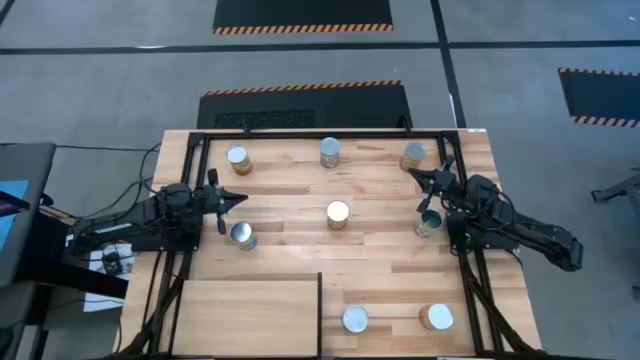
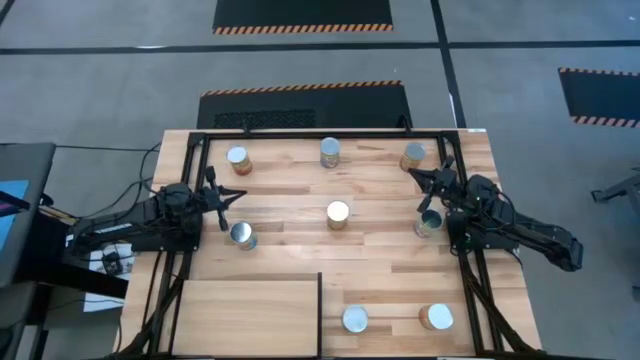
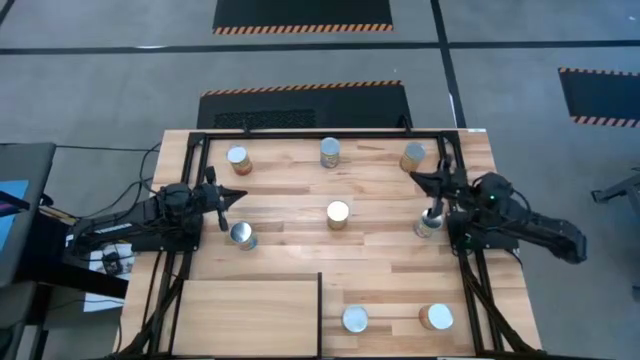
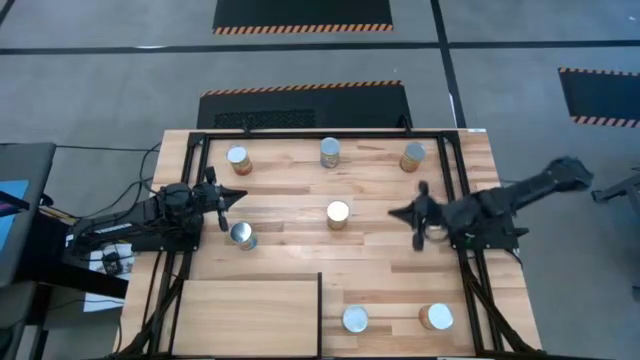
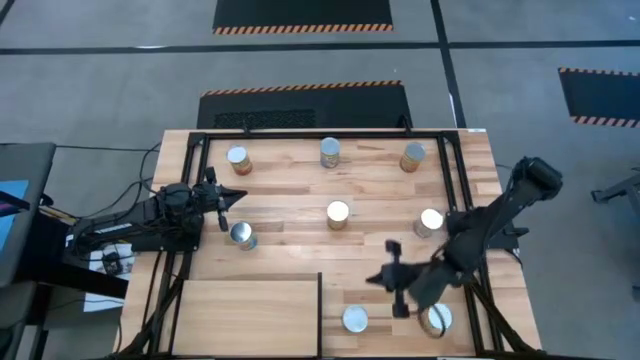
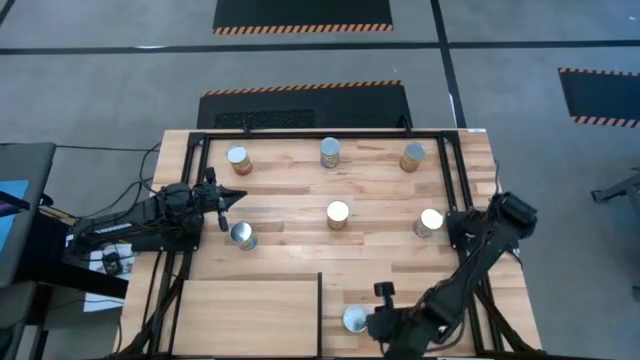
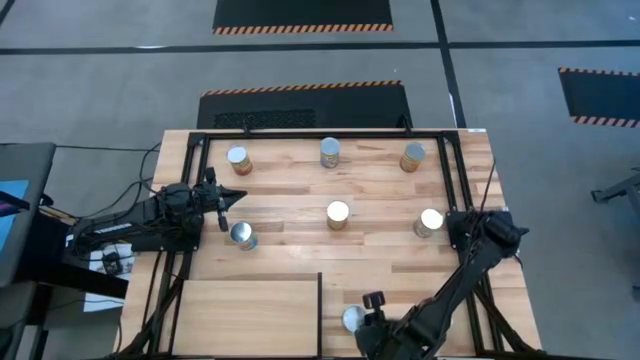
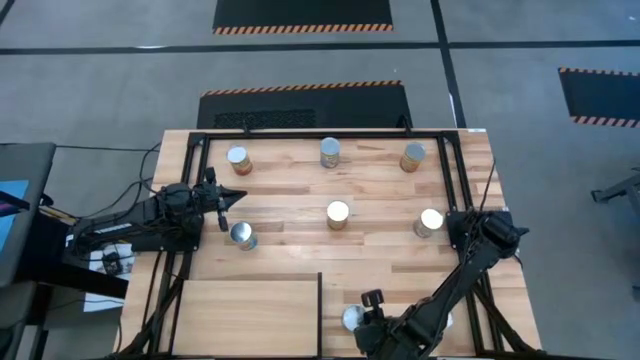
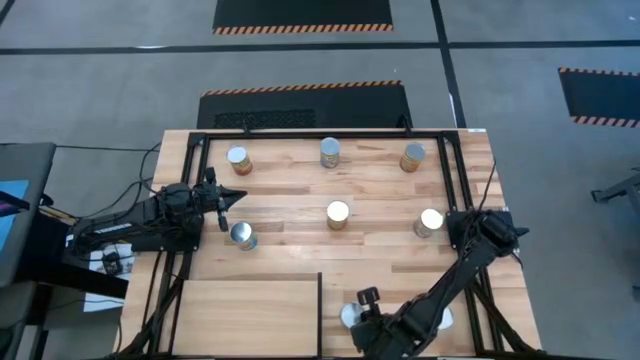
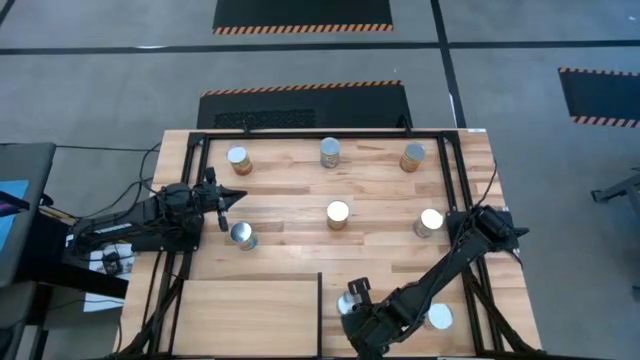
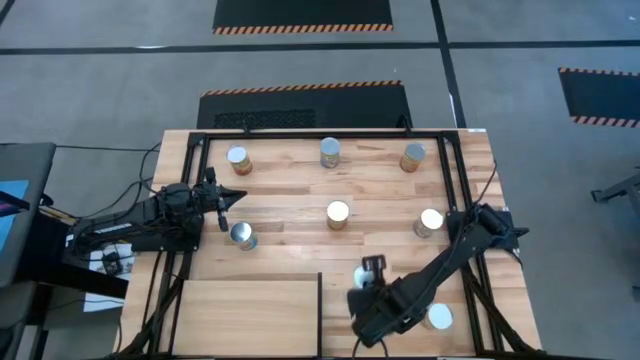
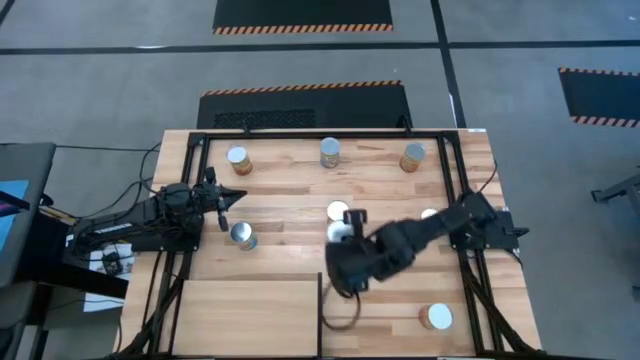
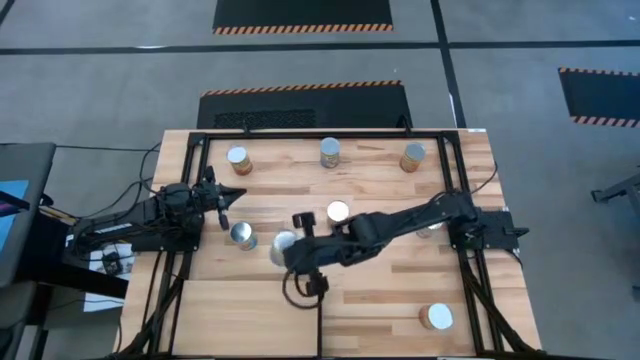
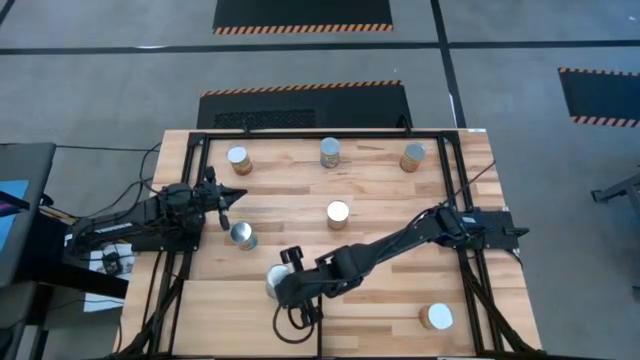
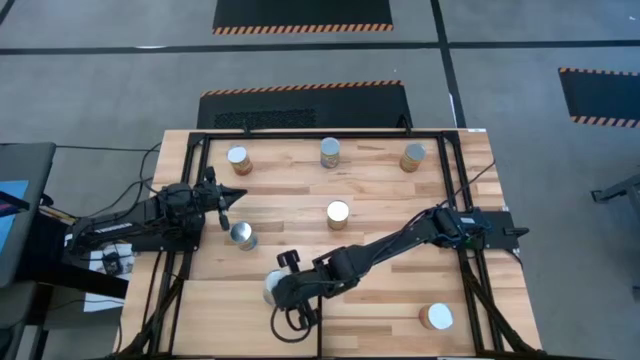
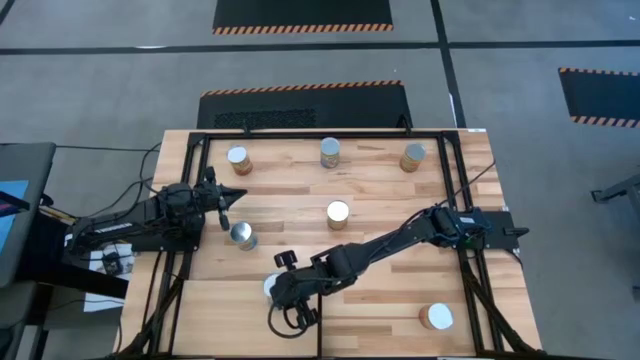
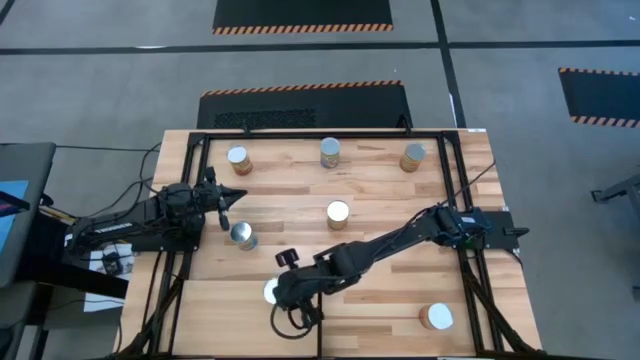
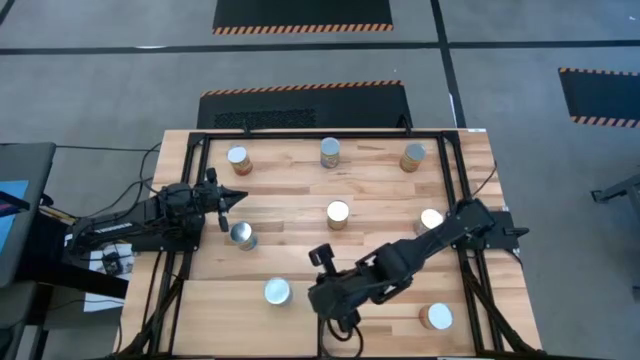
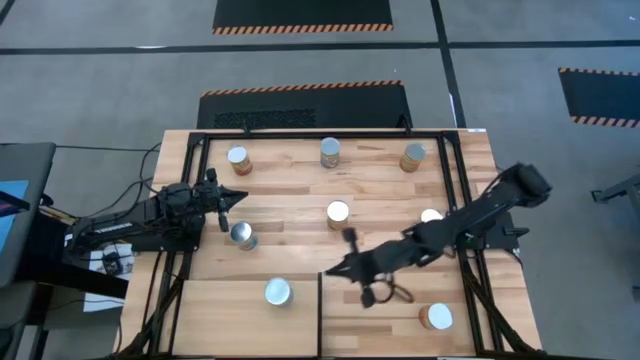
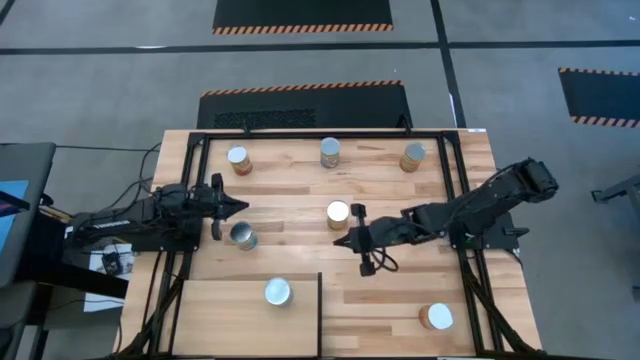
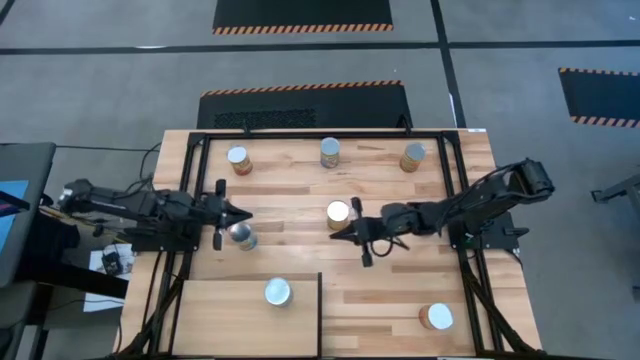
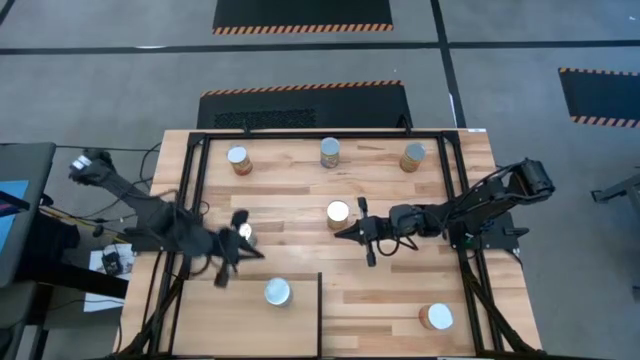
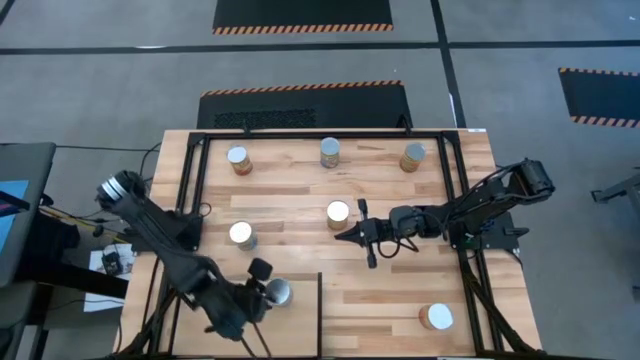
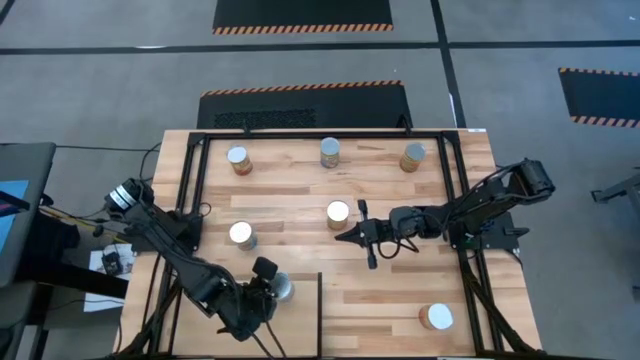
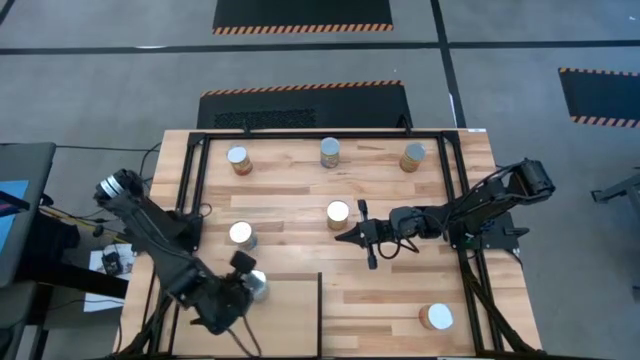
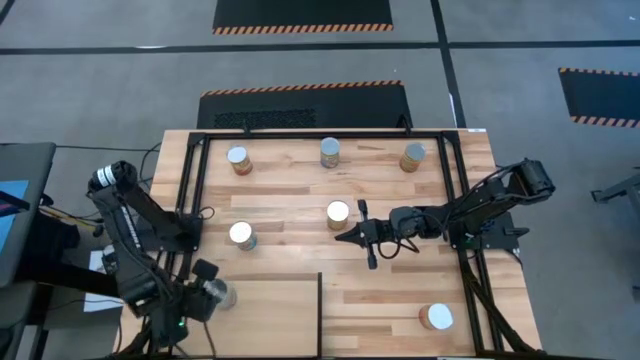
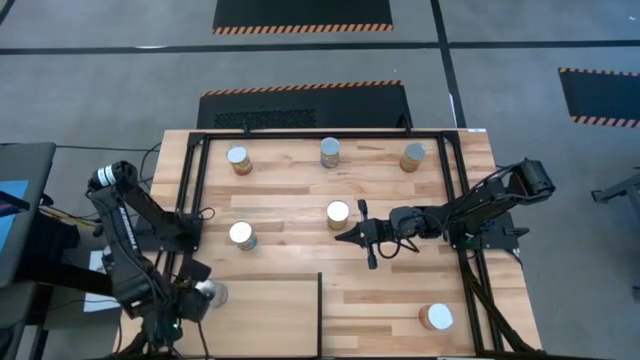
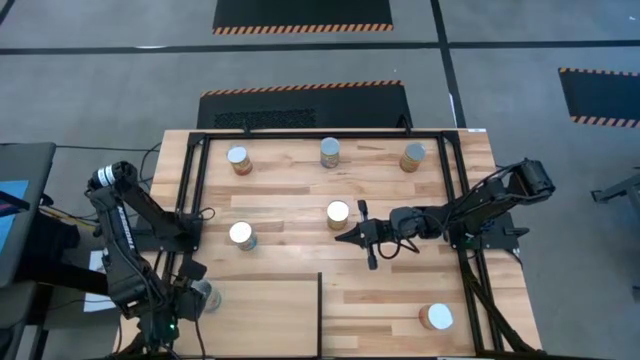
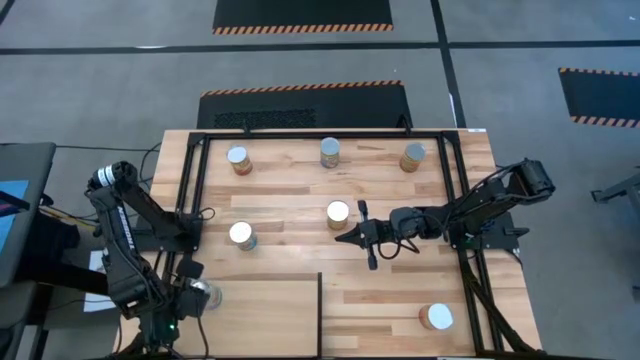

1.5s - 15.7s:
Task: Pick and place cans onto a shelf
Put the canned tomatoes on the shelf

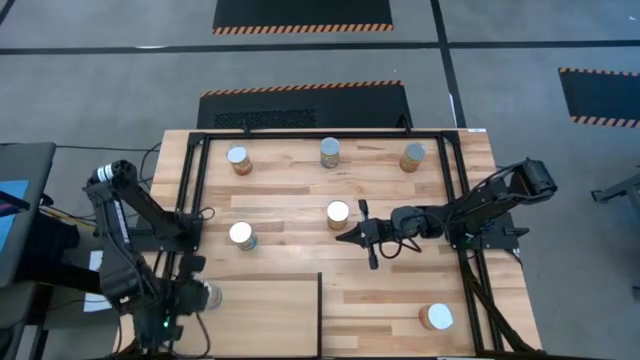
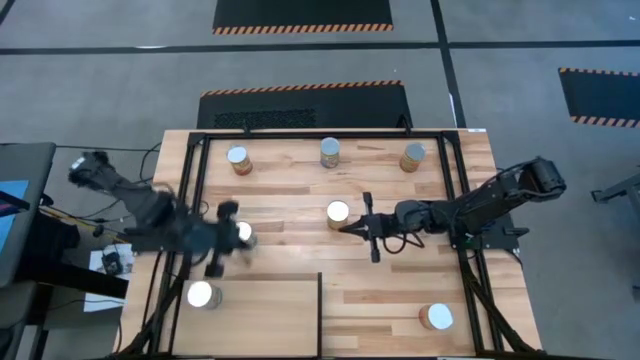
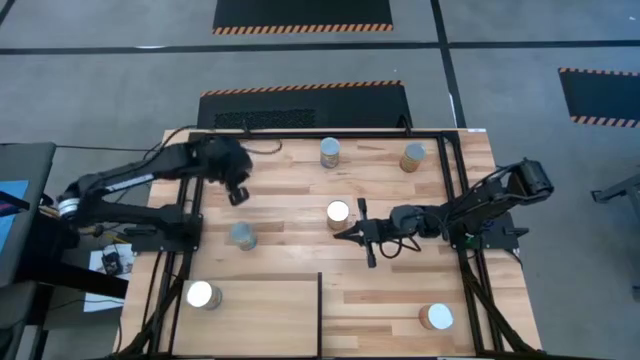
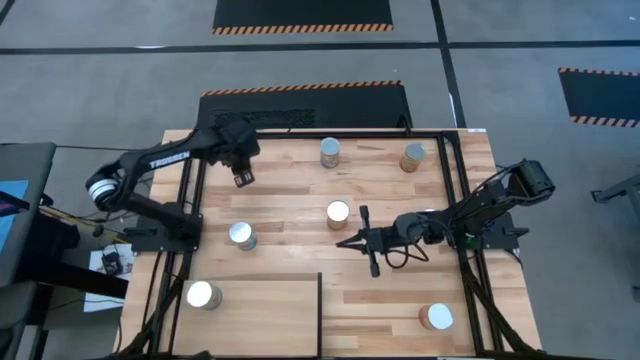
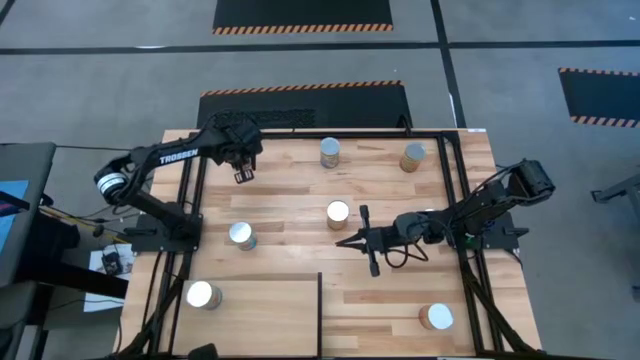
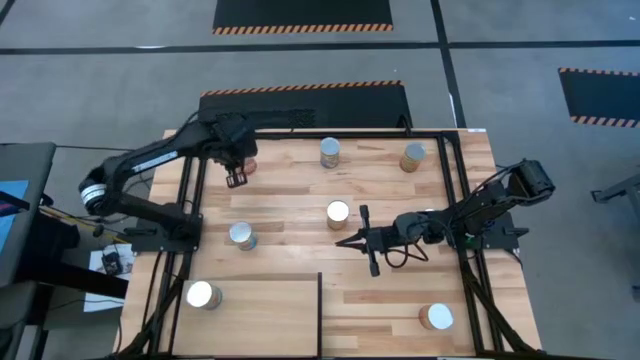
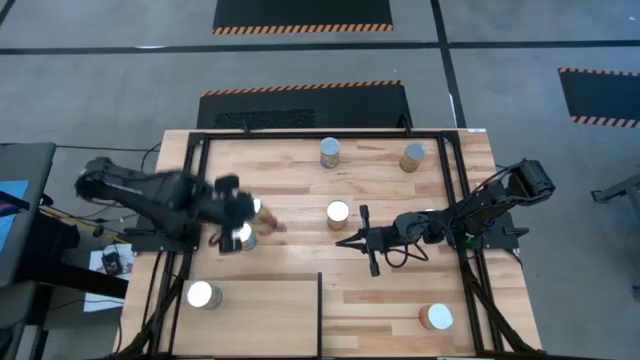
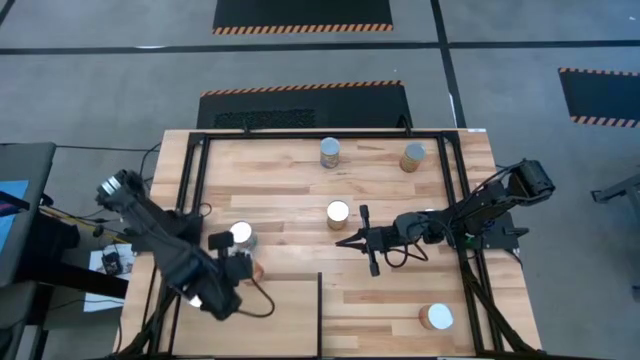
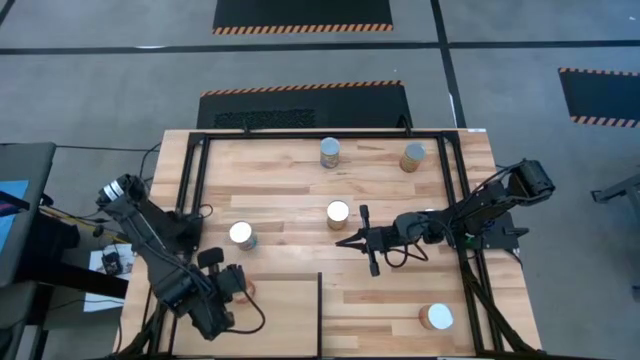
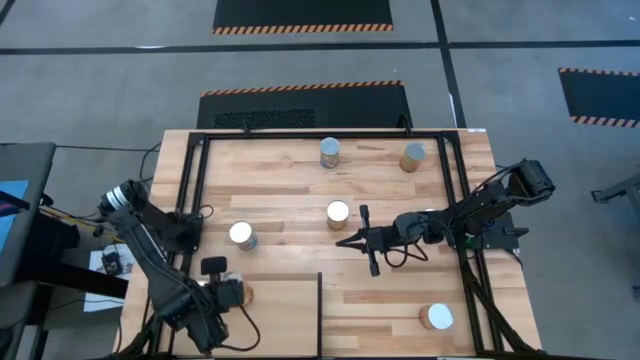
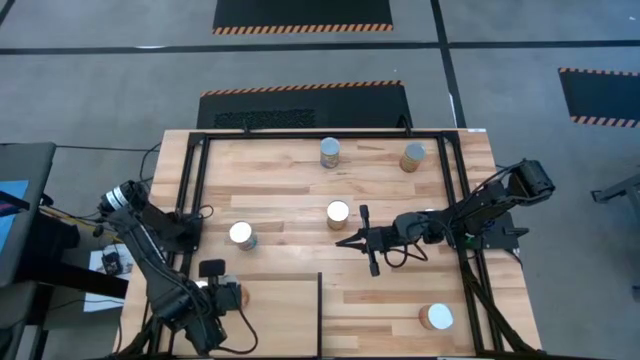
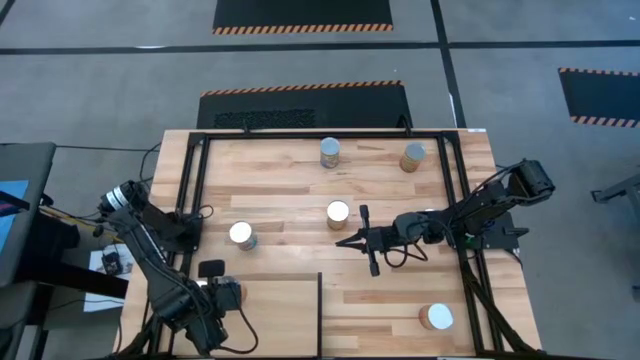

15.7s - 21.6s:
Put the top canned corn on the shelf
